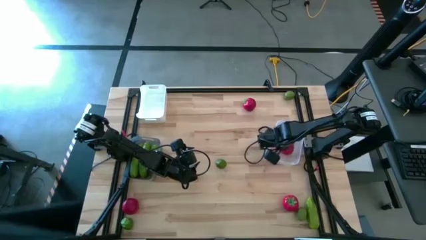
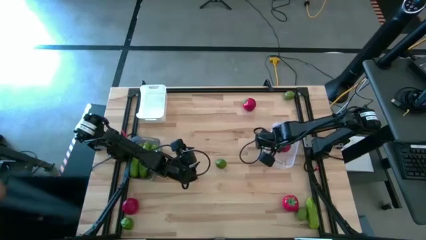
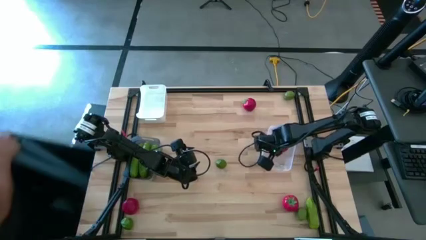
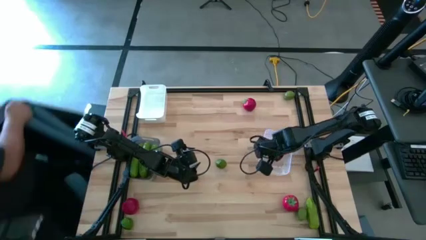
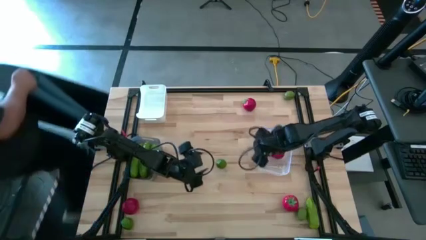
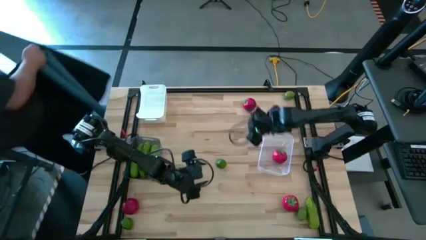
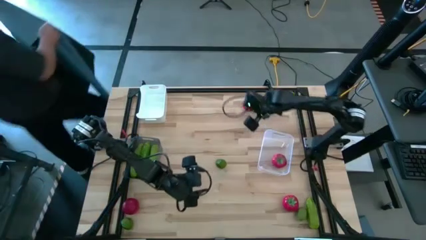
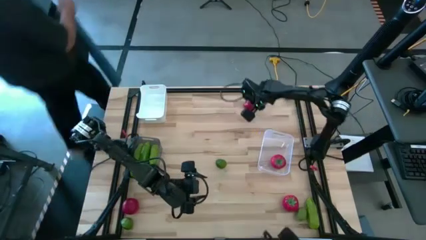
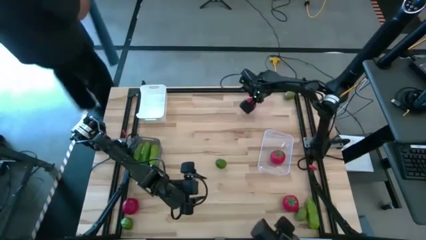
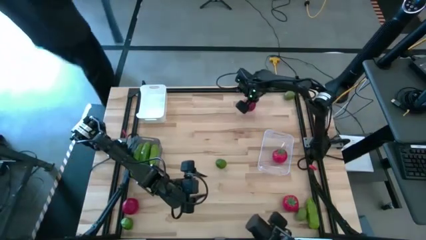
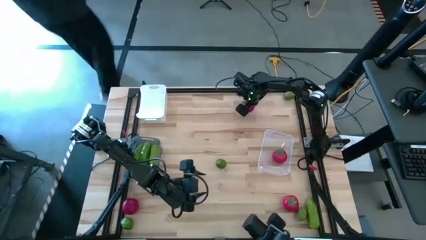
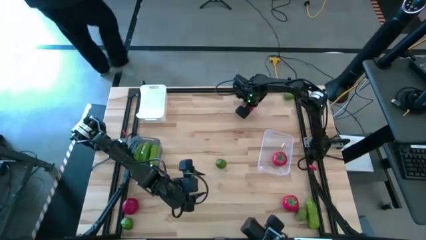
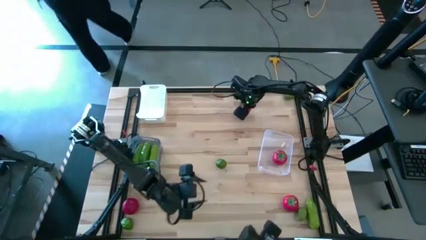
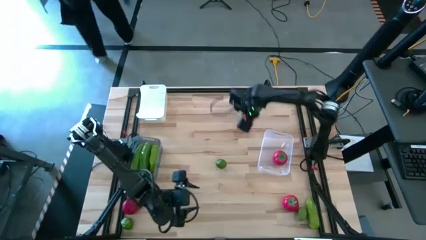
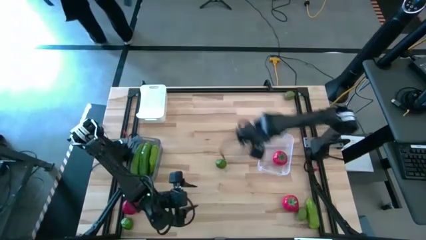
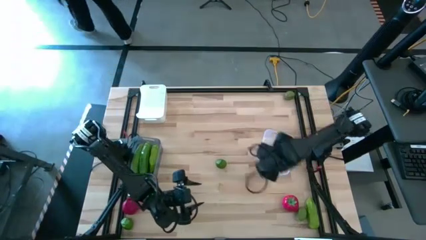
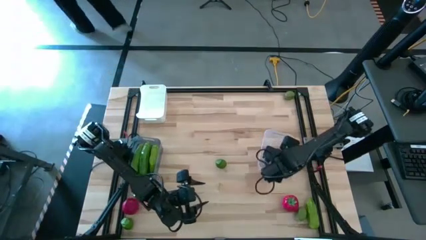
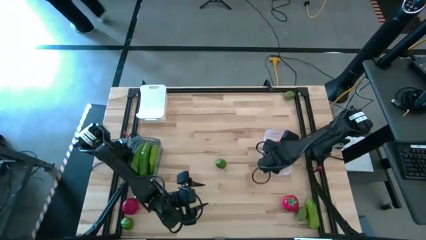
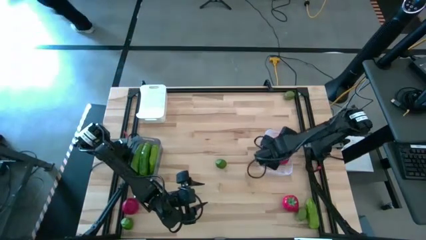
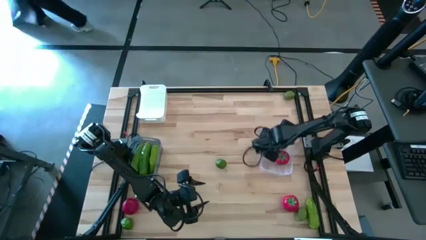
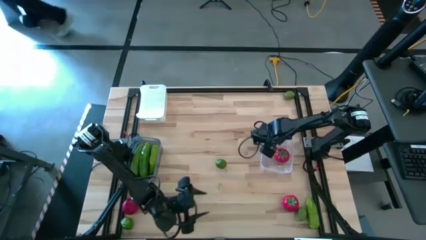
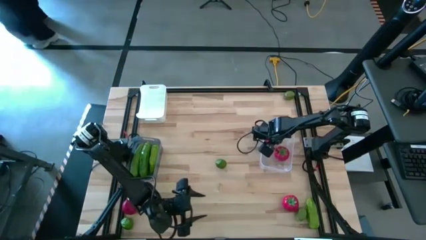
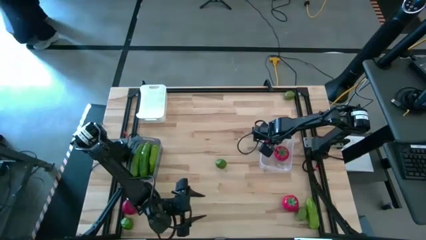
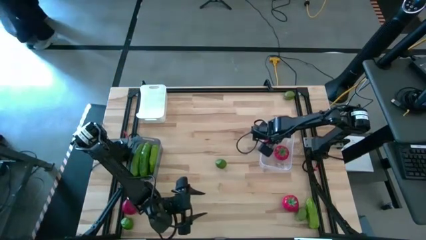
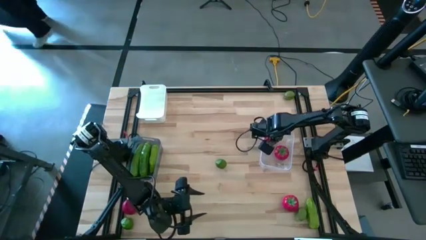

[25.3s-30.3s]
Task: Sort produce into baskets
Put the tomato into the transparent bin

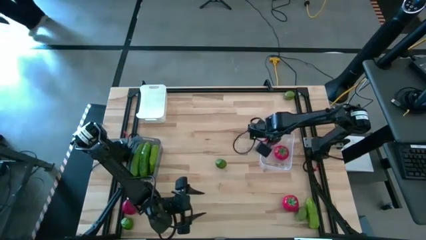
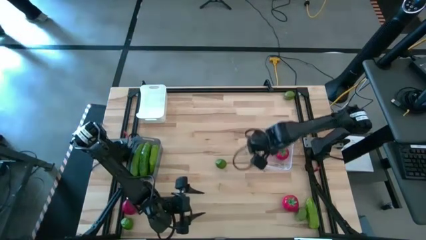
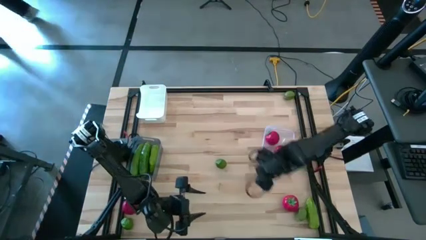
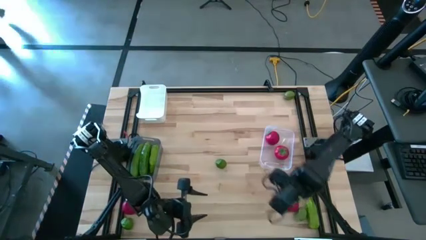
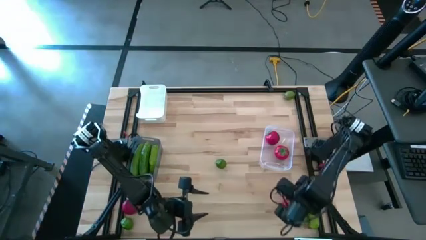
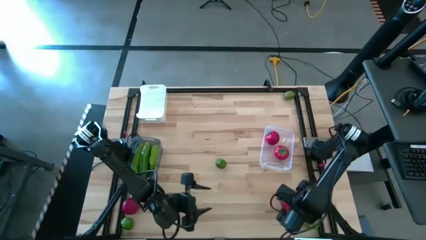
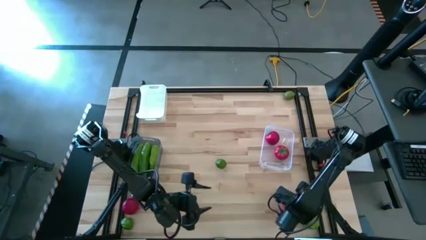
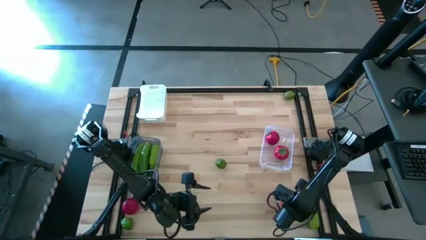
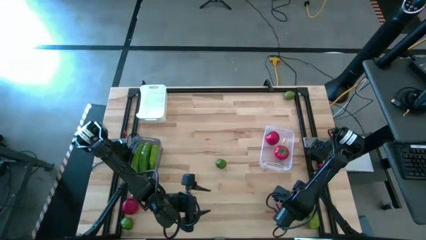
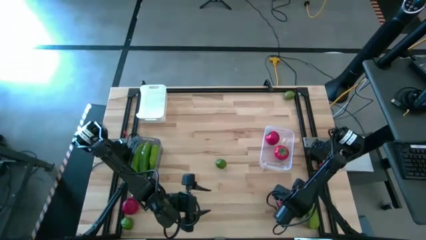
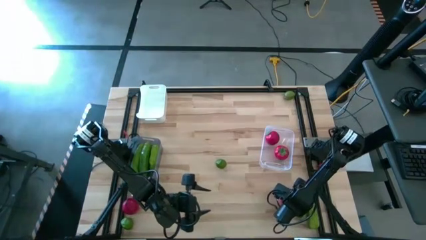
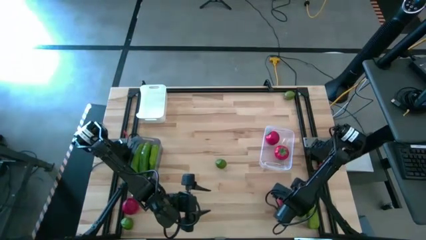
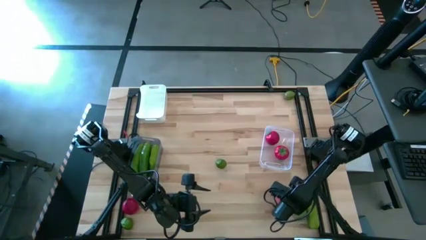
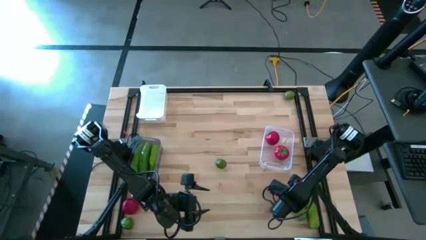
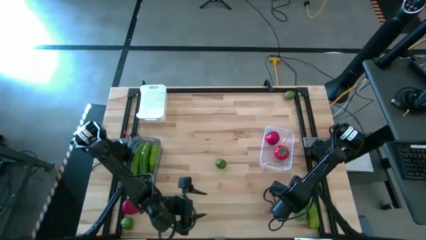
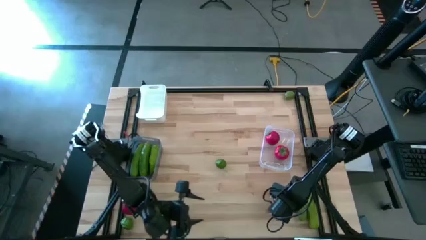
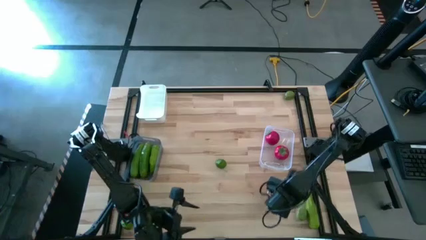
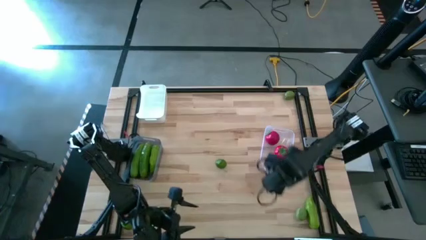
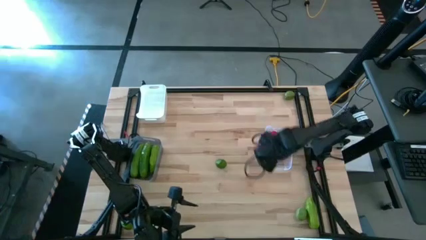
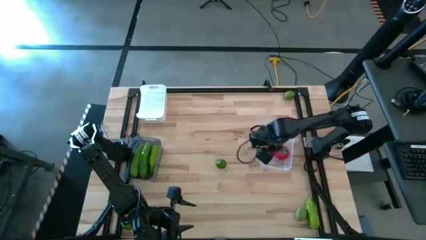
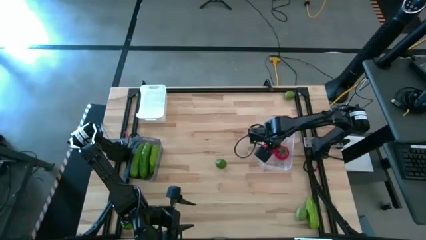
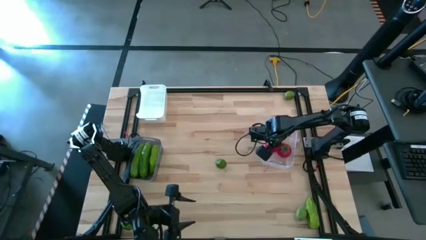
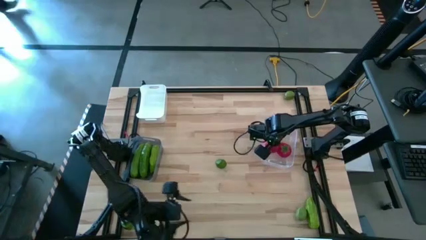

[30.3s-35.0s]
Put the tomato into the transparent bin

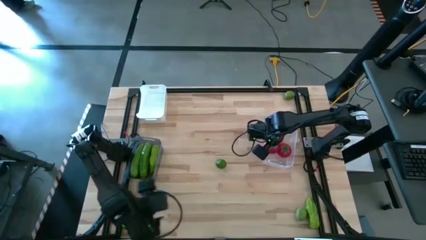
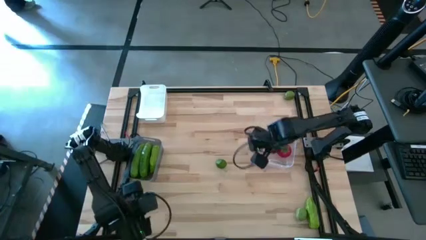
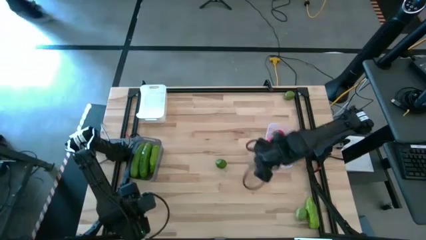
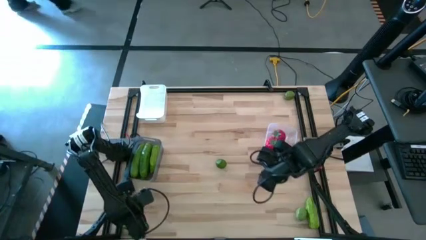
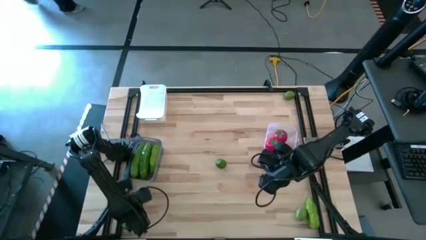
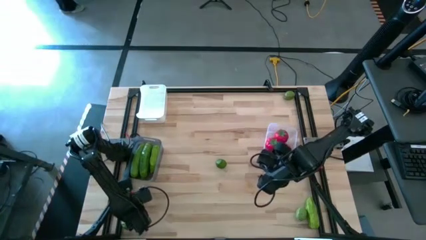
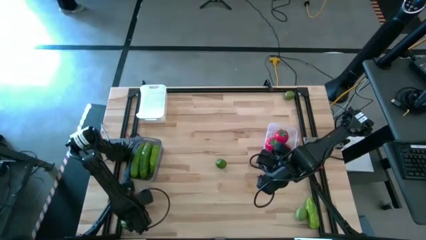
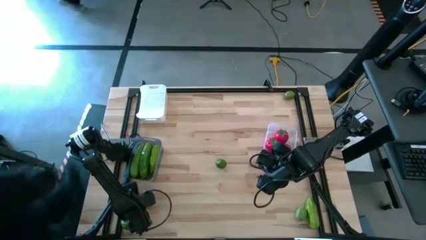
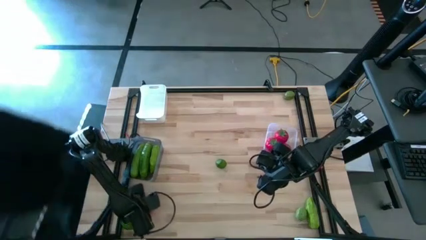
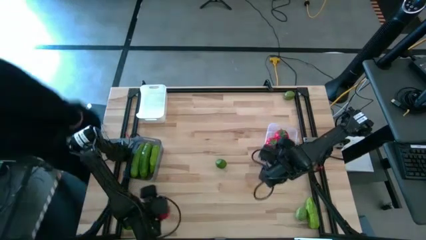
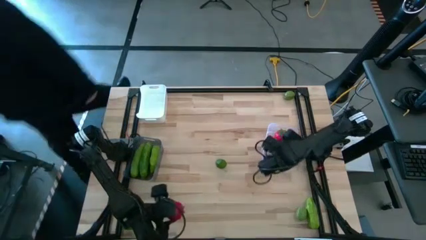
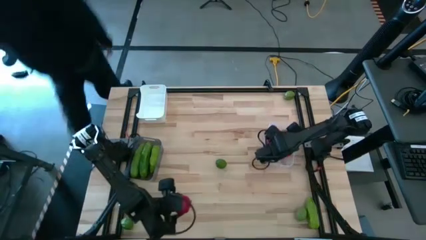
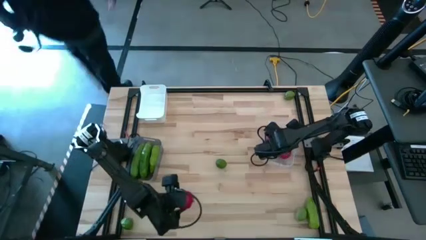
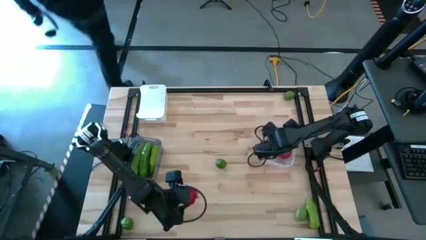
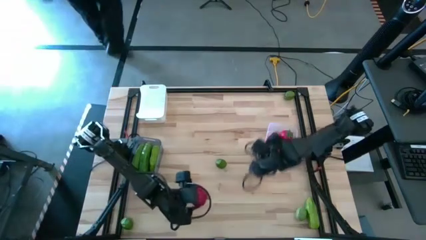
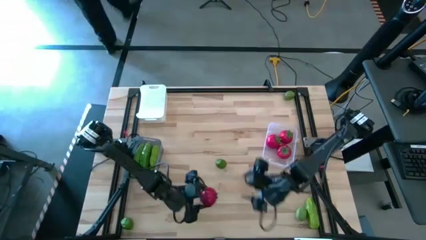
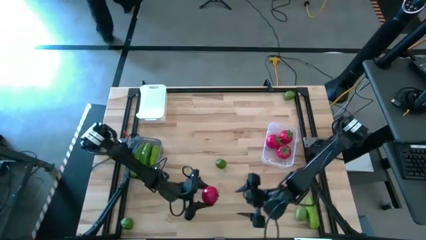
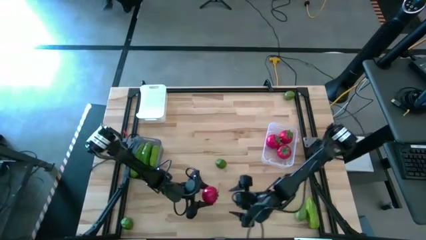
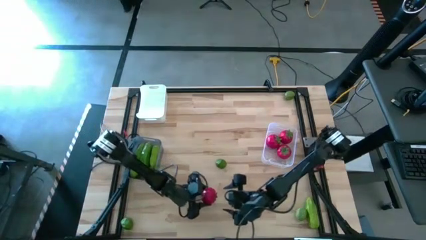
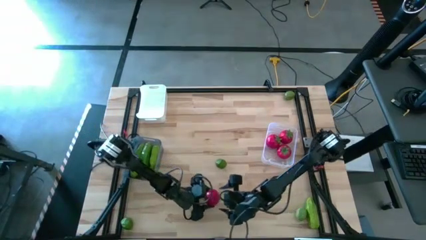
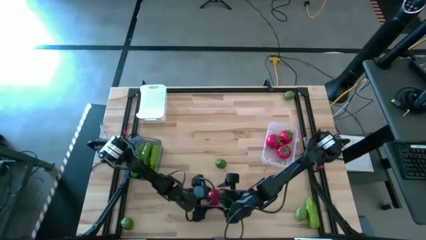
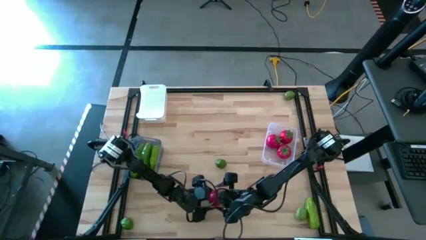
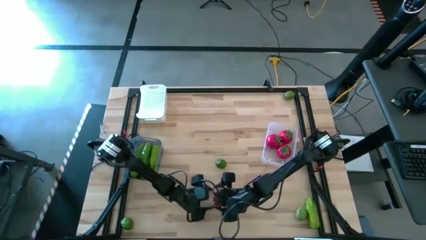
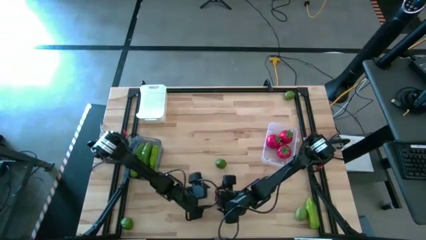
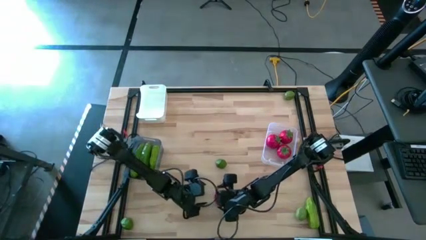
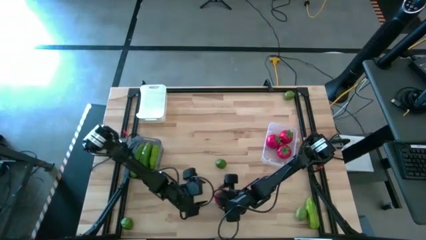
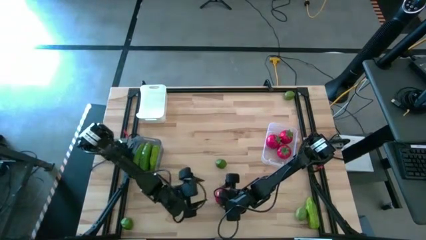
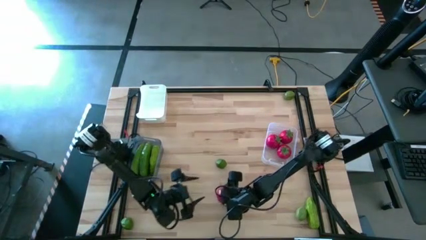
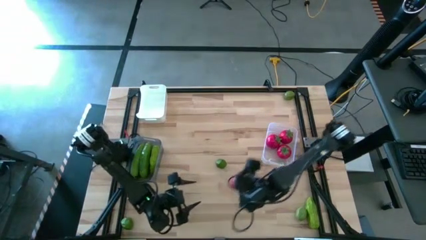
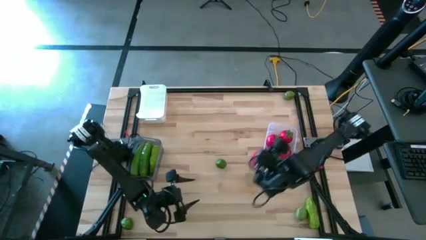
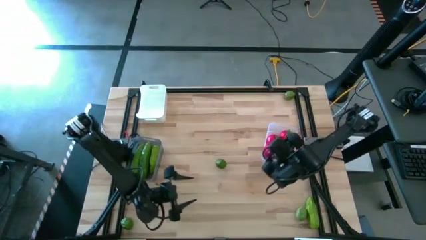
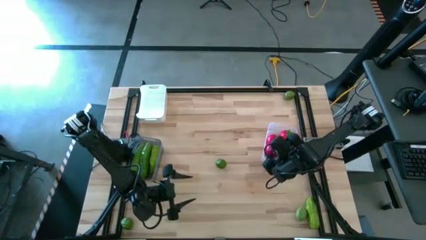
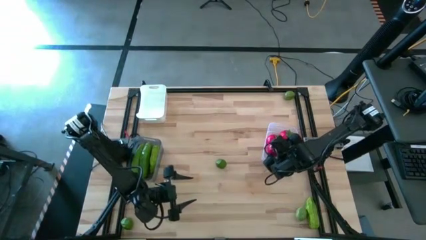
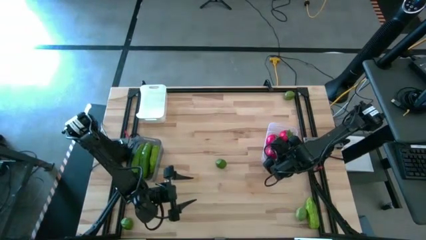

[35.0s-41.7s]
Put the tomato into the transparent bin

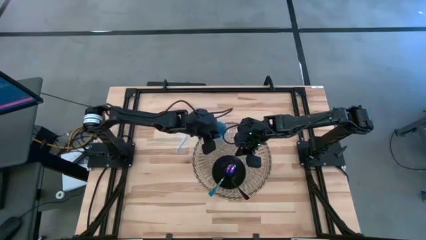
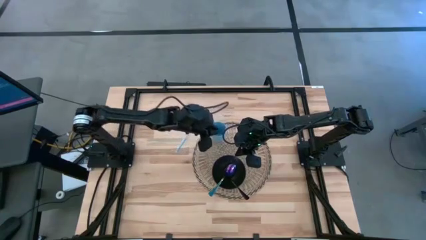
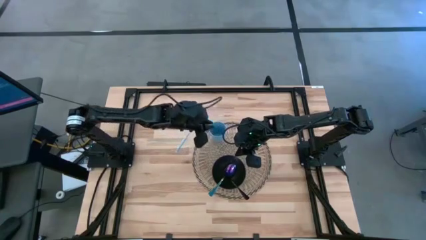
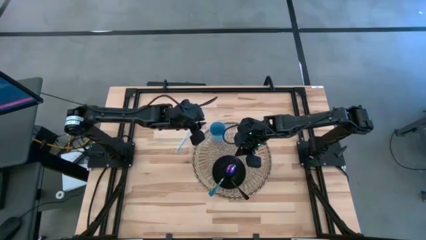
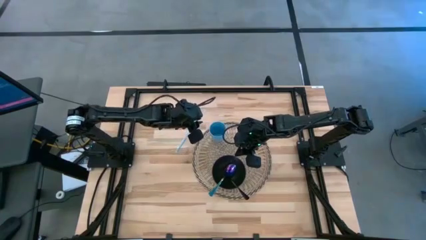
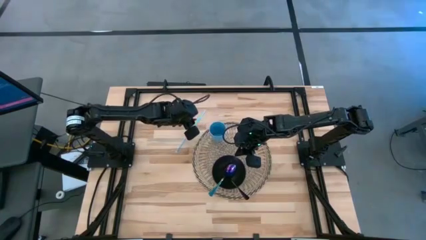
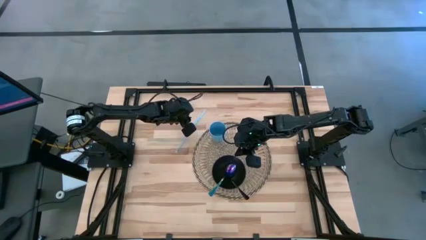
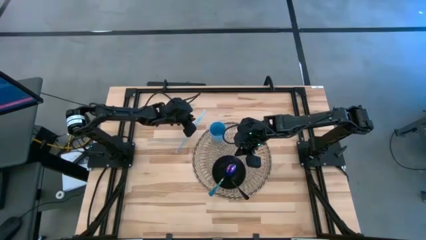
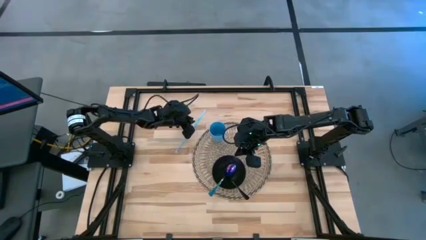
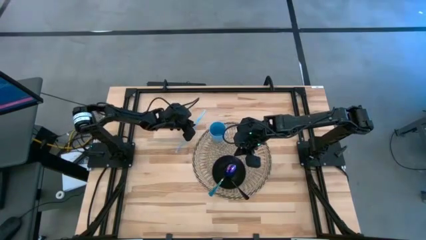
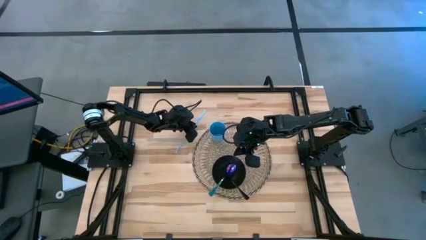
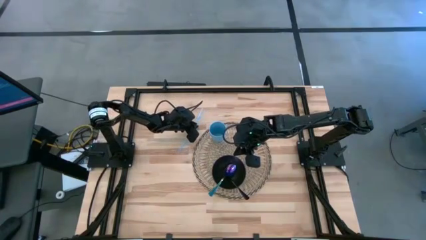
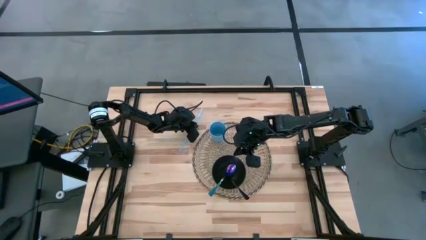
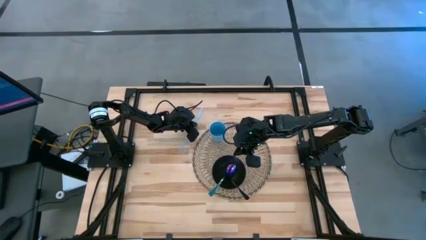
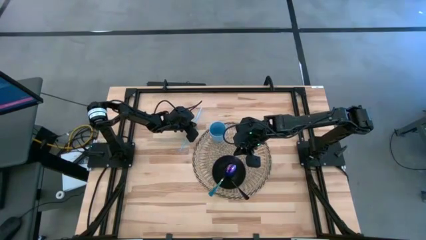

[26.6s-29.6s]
Task: Pick & Place Utensil
Put the blue straw into the blue cup
